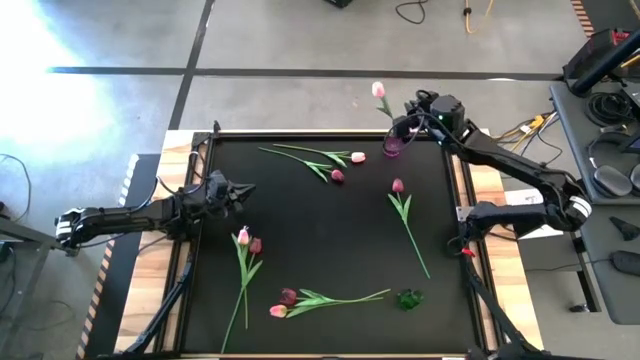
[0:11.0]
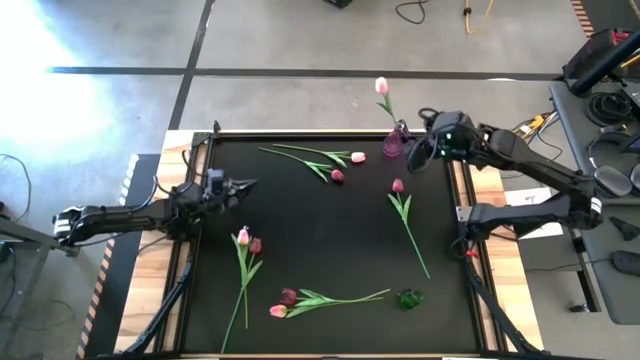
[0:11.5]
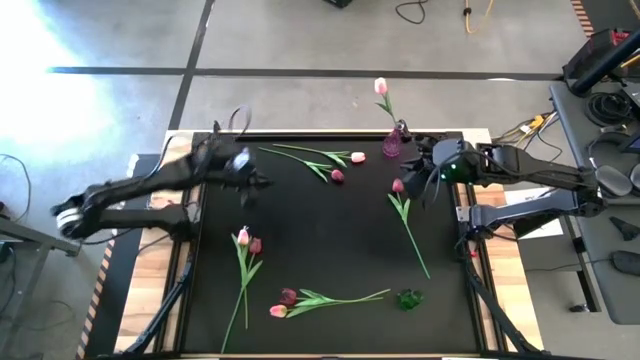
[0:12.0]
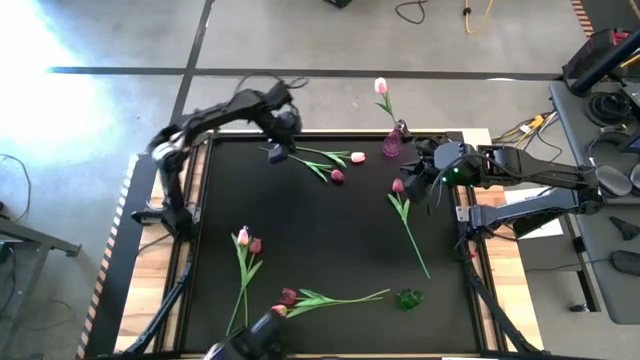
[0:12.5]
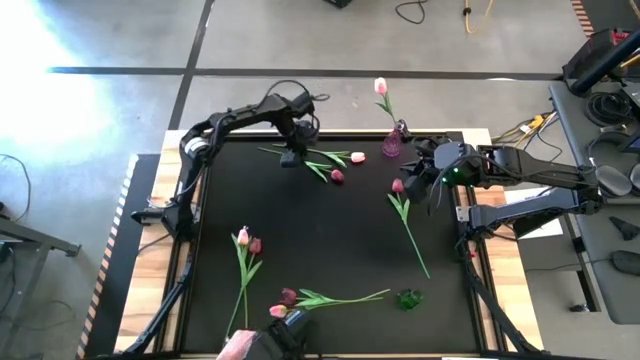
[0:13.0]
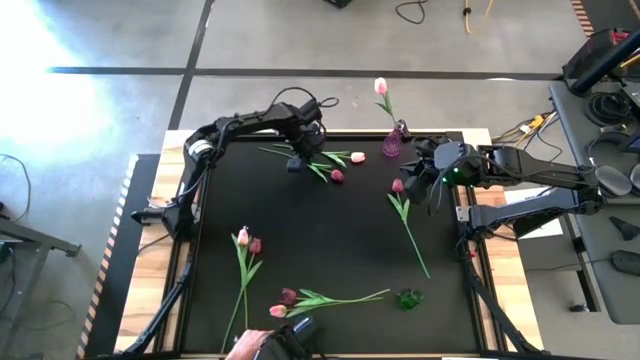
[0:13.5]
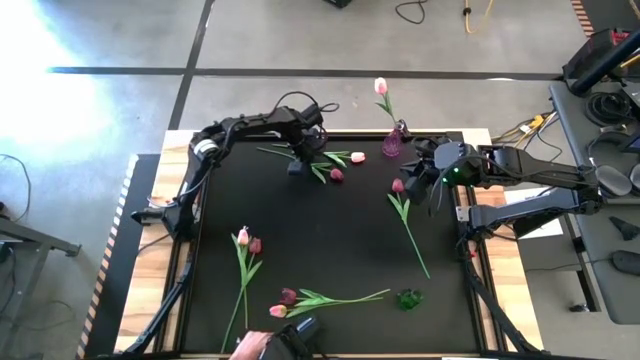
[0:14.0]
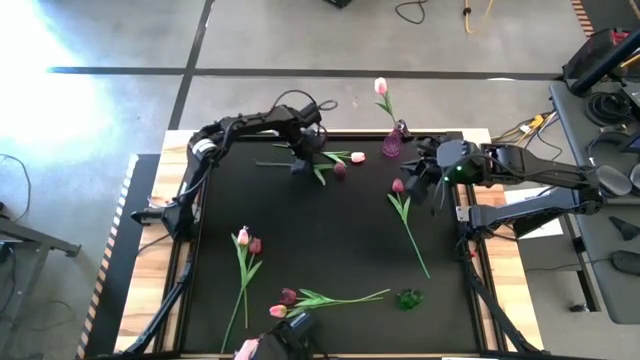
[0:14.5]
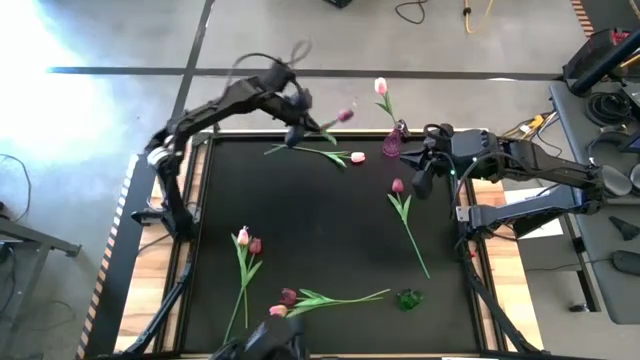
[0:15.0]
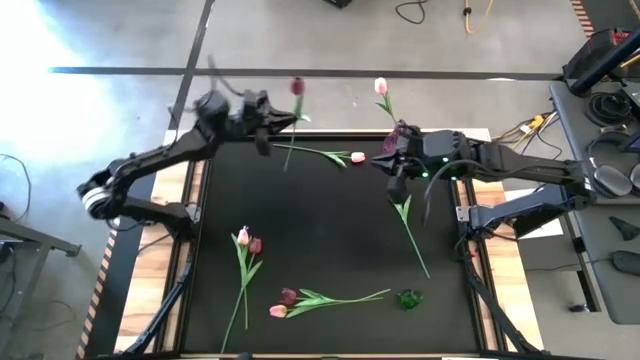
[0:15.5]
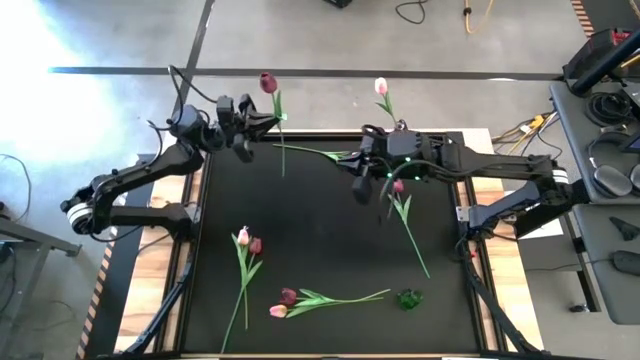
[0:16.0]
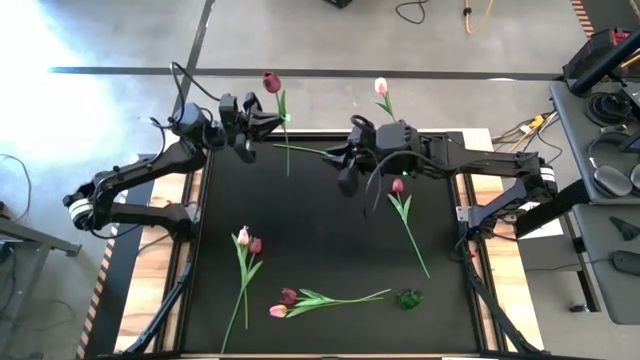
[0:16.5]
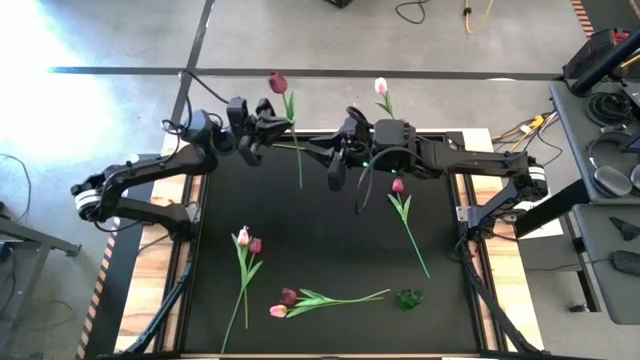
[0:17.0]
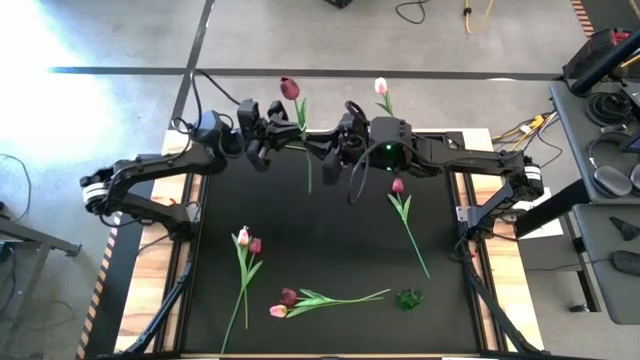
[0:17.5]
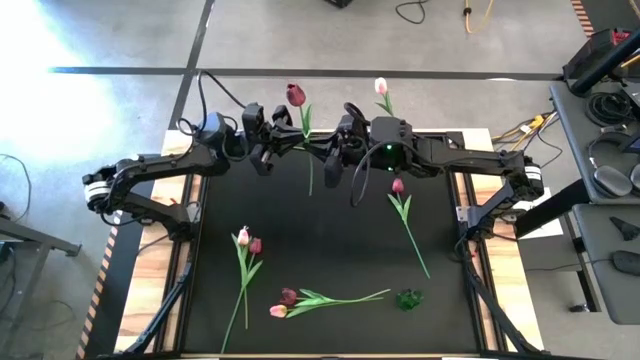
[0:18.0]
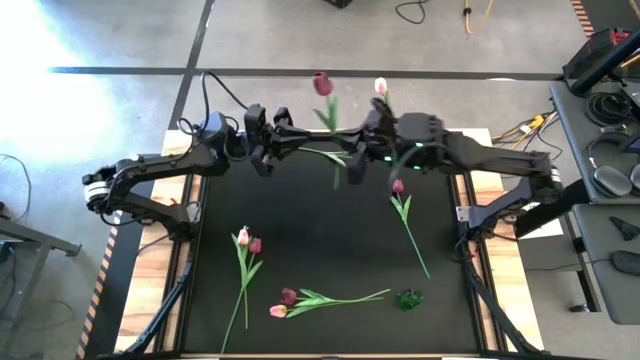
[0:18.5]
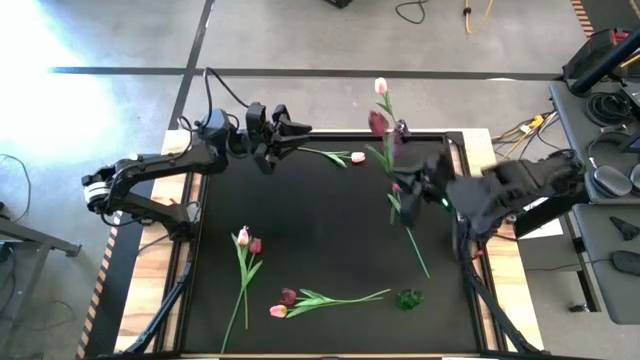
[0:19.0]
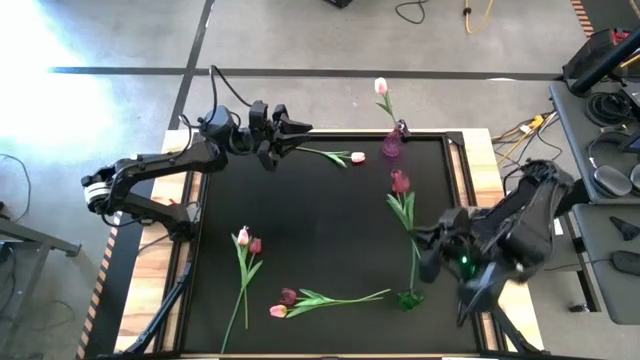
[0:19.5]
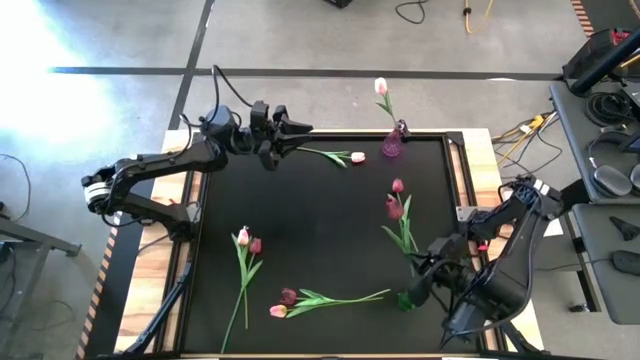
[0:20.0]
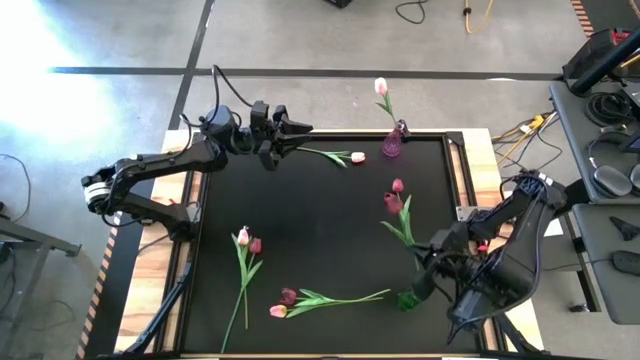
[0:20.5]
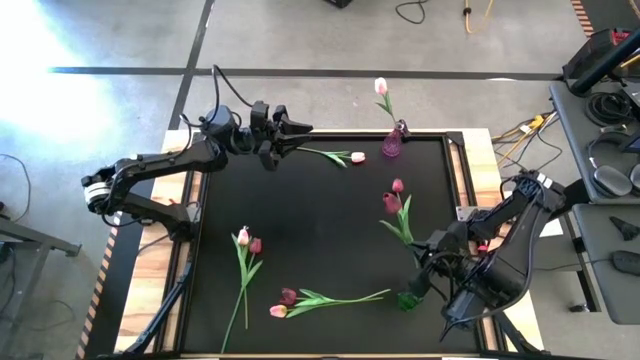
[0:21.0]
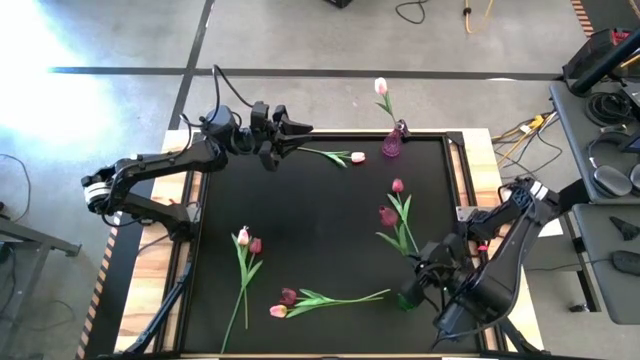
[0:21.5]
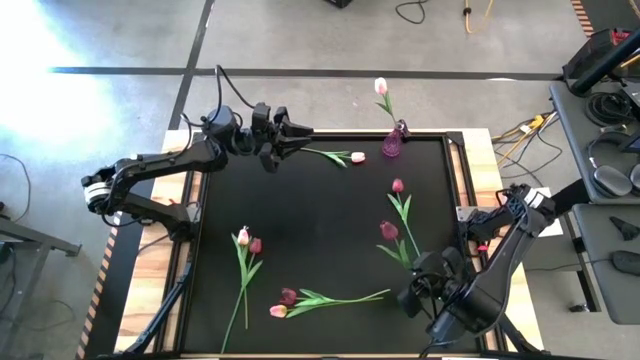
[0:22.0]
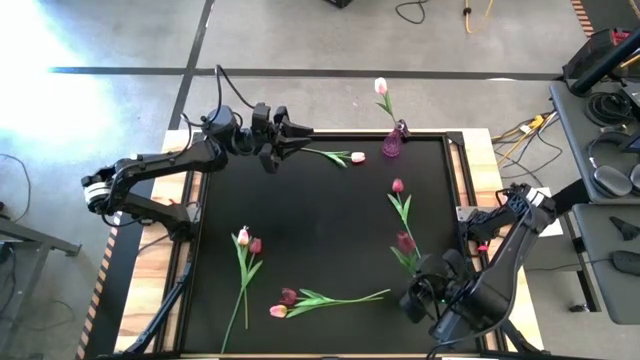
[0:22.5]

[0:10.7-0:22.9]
Task: Sort flowers into vase by color
Put the top center red tulip into the transparent green vase

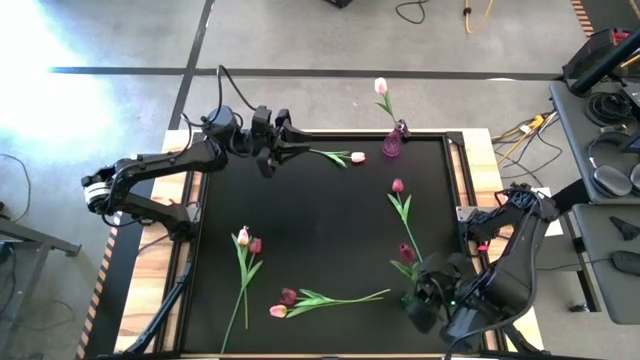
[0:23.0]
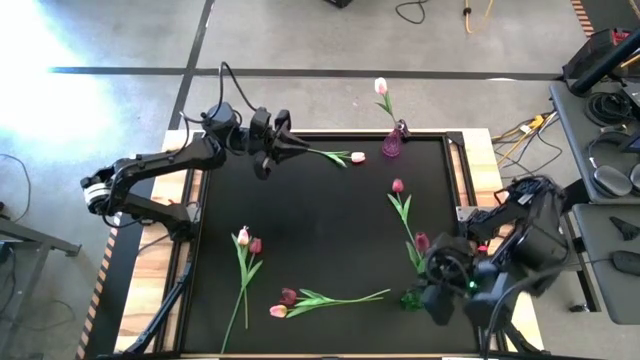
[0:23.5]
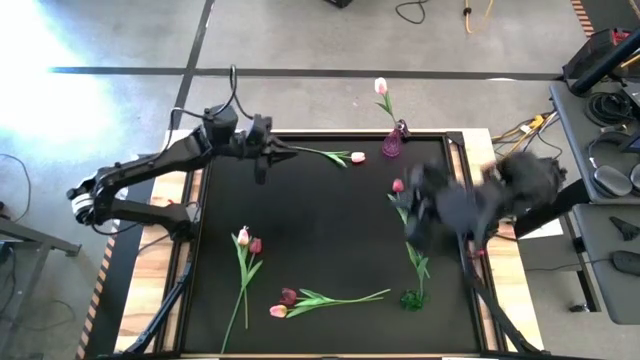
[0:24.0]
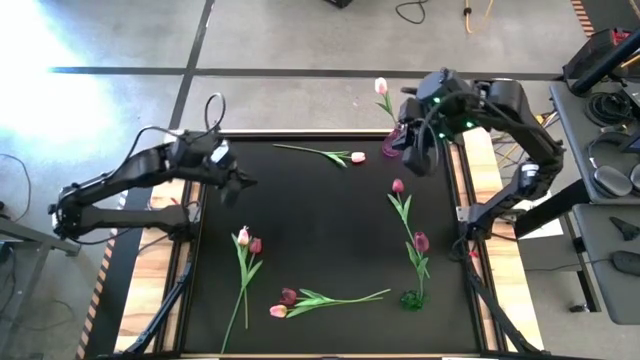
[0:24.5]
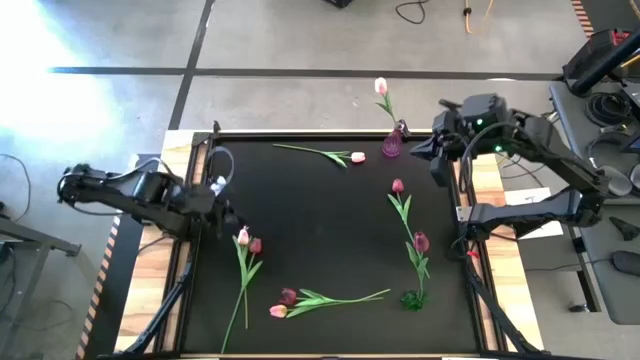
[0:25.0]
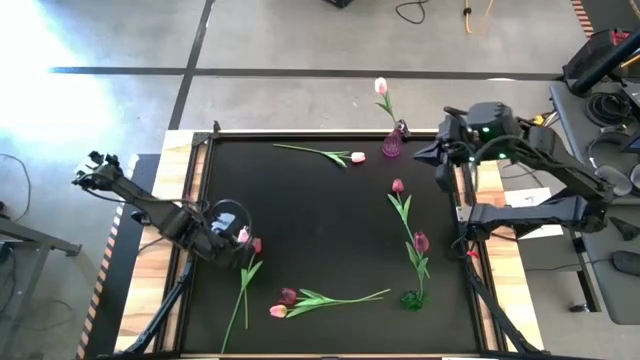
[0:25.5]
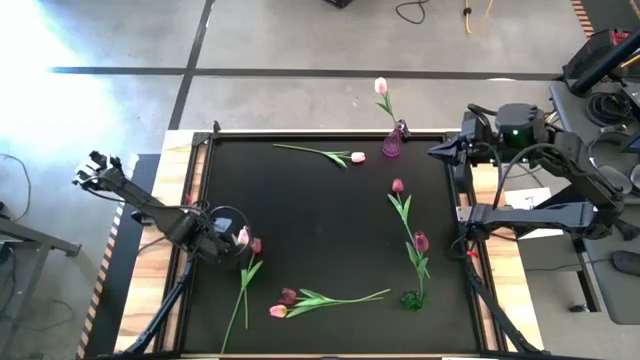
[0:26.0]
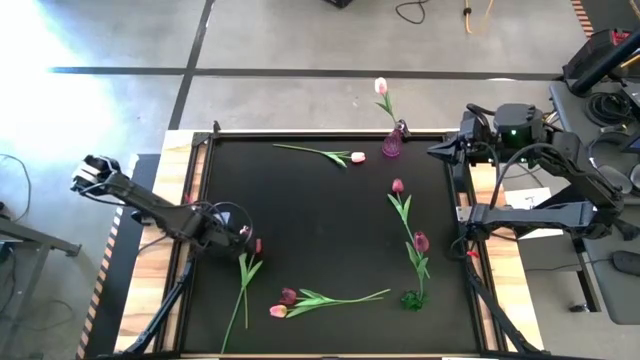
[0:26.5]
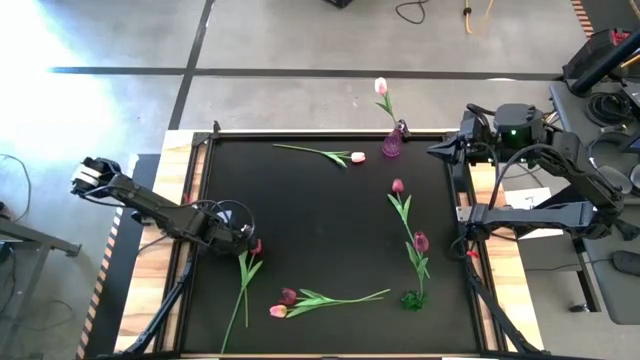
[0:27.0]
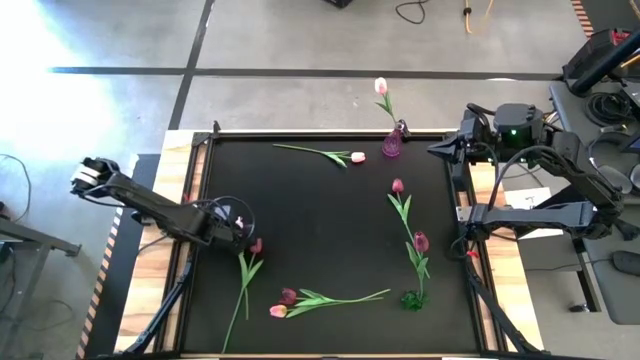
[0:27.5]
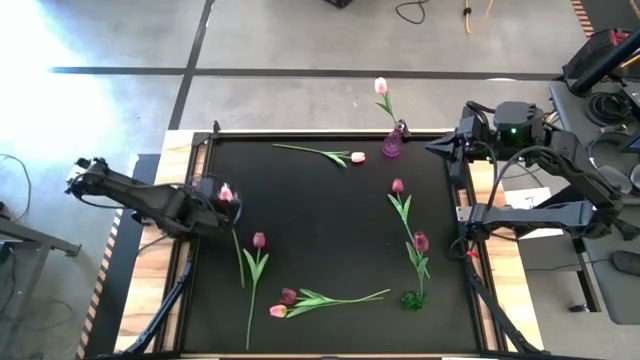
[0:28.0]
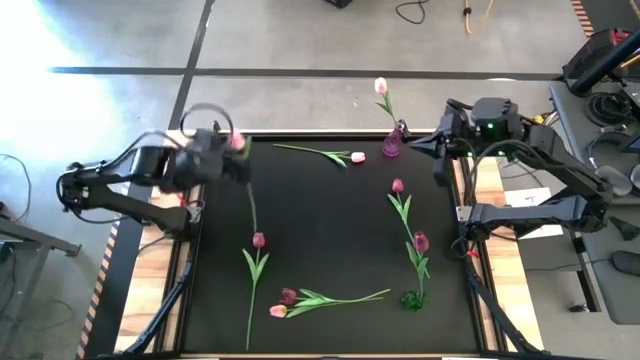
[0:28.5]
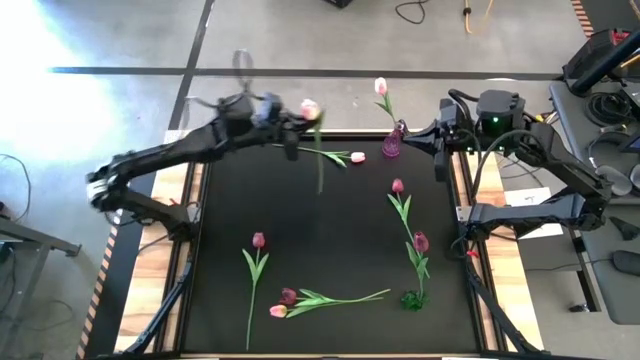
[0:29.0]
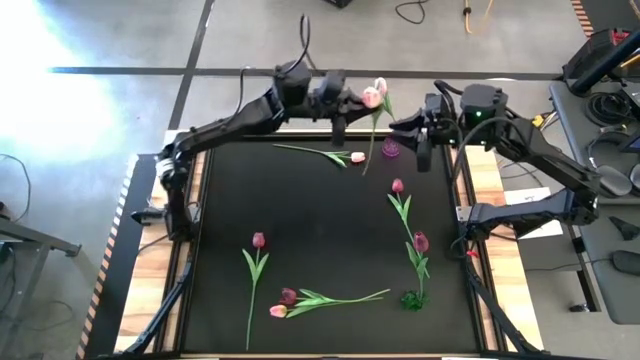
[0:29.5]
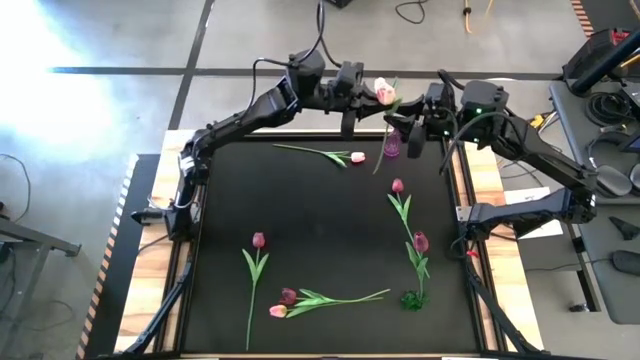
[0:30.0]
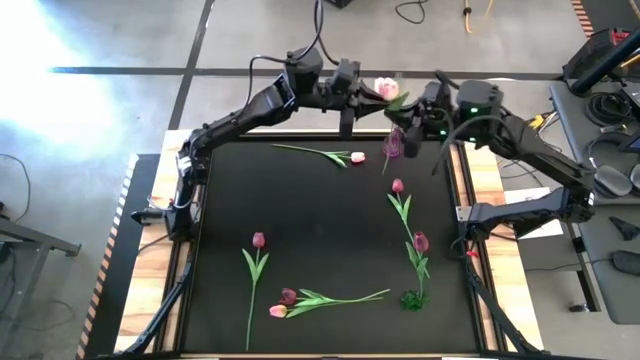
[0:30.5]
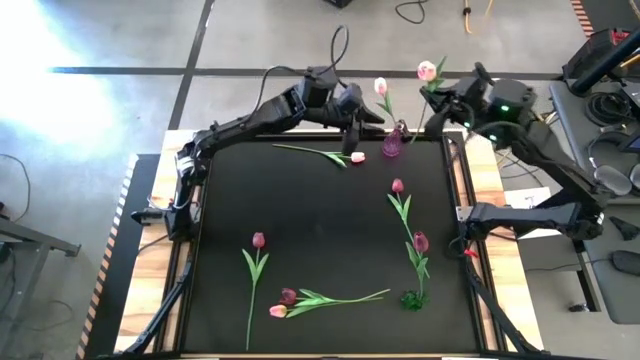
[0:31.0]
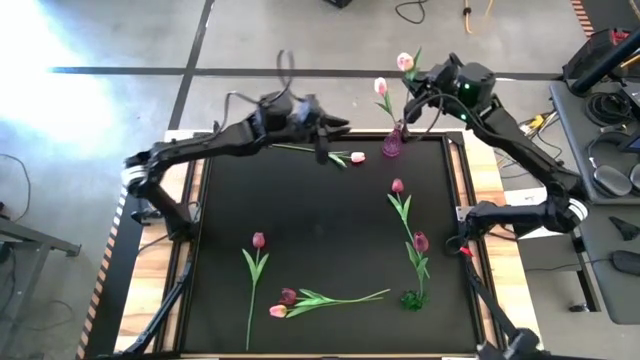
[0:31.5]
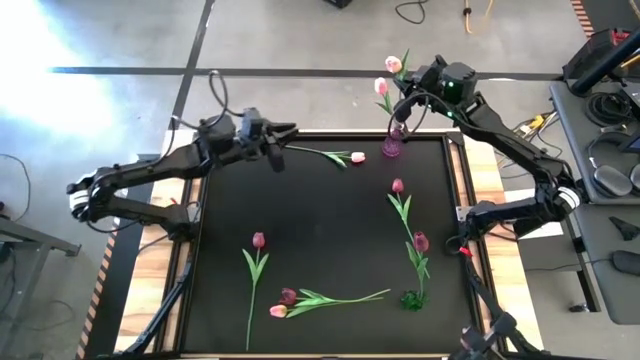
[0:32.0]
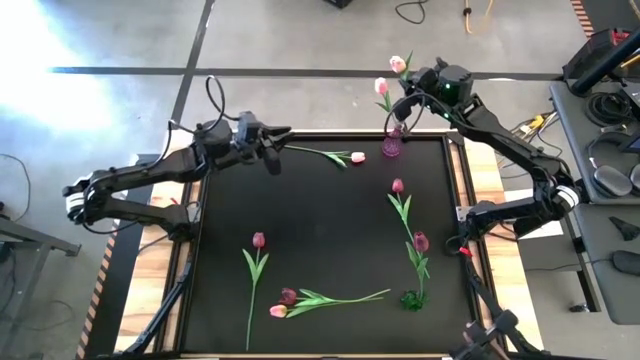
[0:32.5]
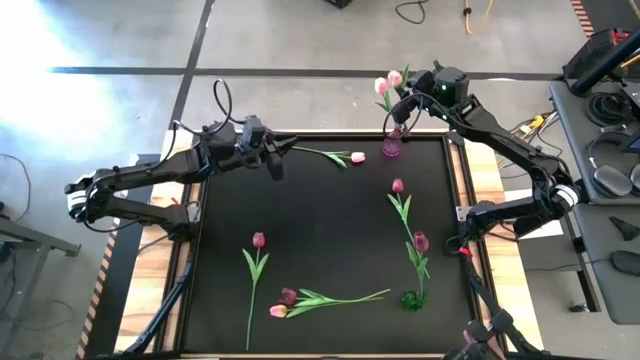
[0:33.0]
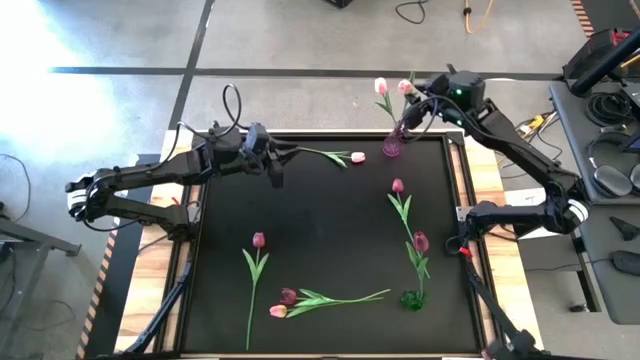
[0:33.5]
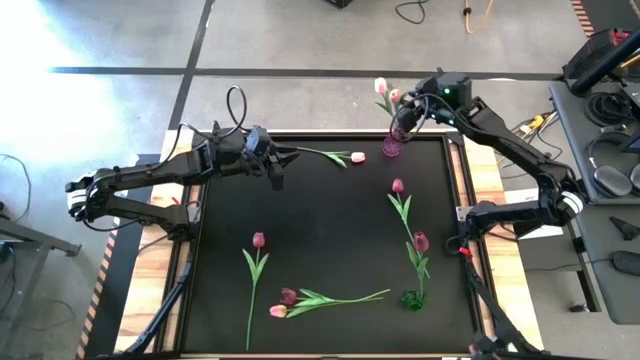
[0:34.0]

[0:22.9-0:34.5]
Put the middle left pink tulip into the transparent pink vase
